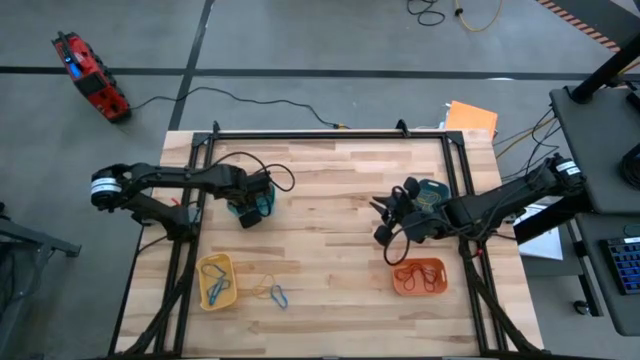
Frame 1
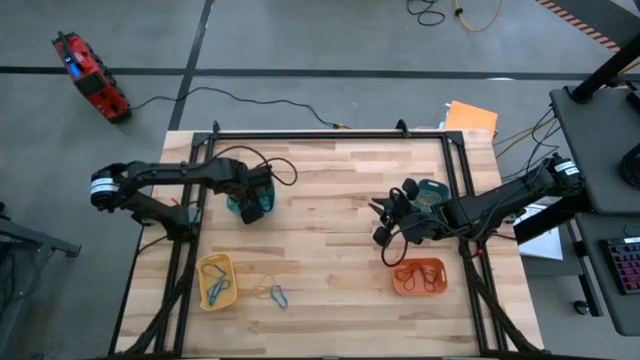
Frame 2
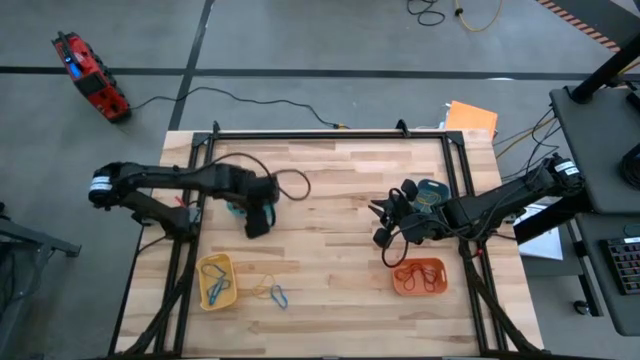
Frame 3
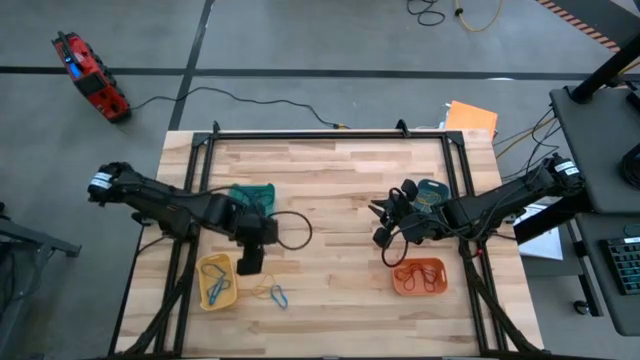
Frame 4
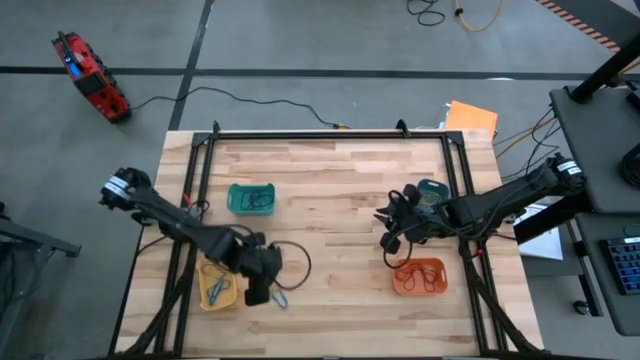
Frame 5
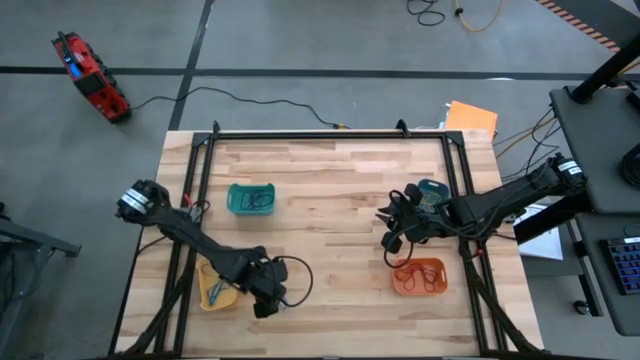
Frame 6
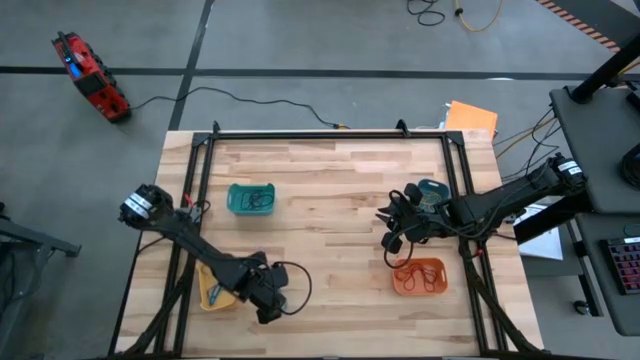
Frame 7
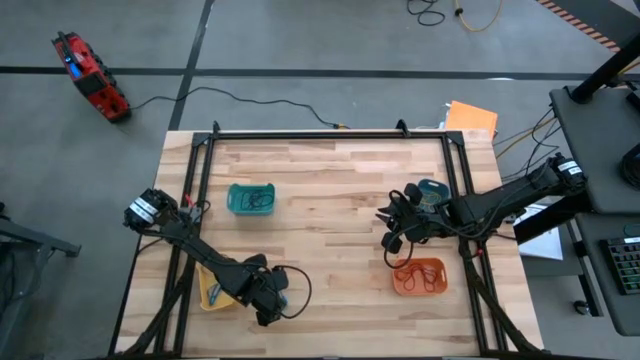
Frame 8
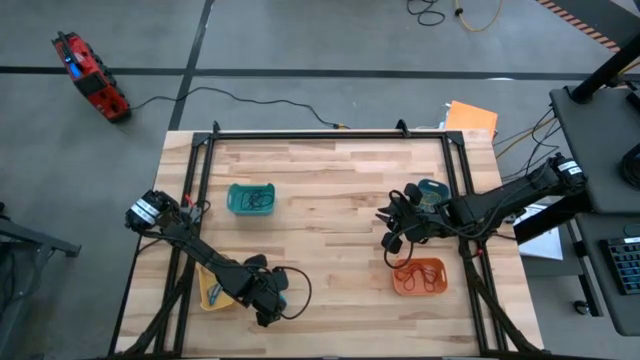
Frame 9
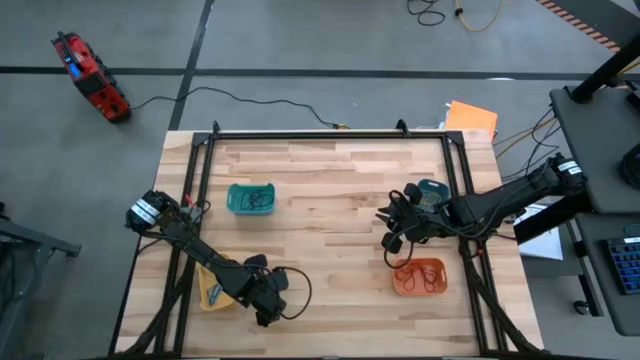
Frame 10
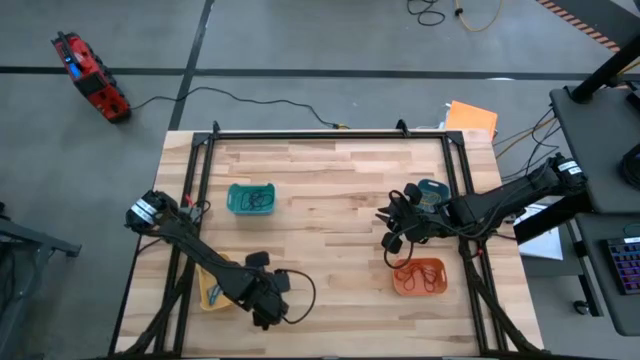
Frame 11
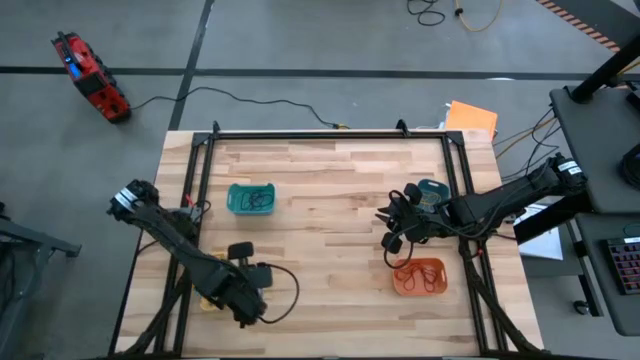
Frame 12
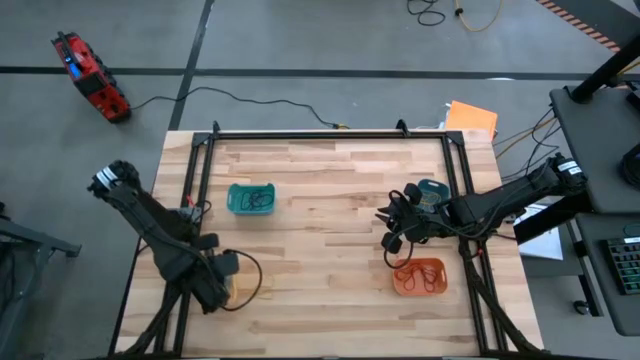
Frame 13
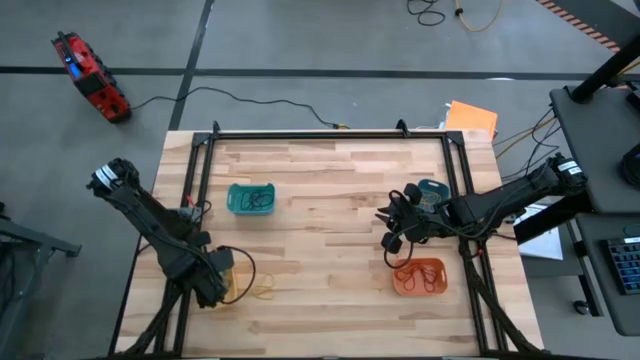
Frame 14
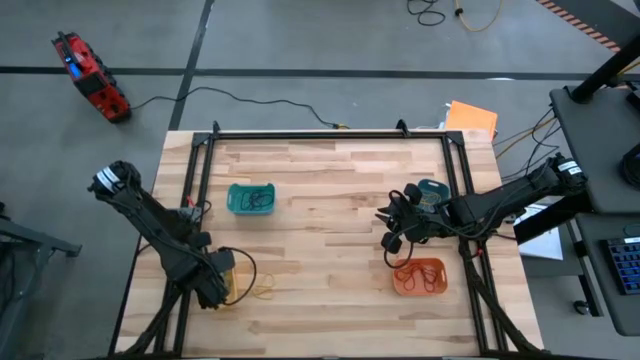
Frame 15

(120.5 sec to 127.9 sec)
Task: Sort rubber bands into baskets
Put the blue rubber band into the yellow bin

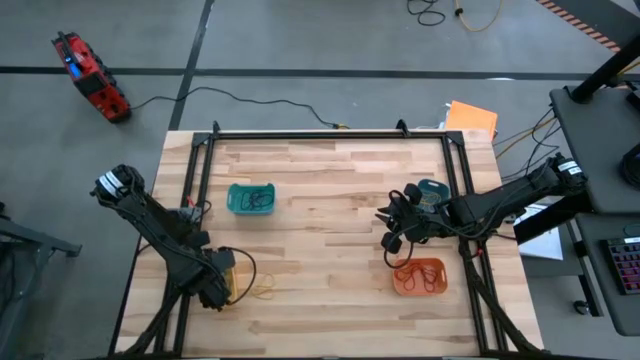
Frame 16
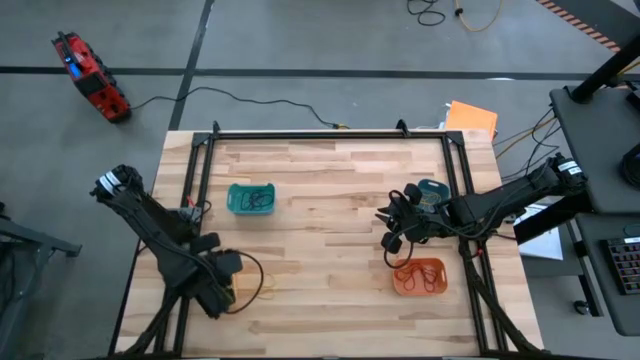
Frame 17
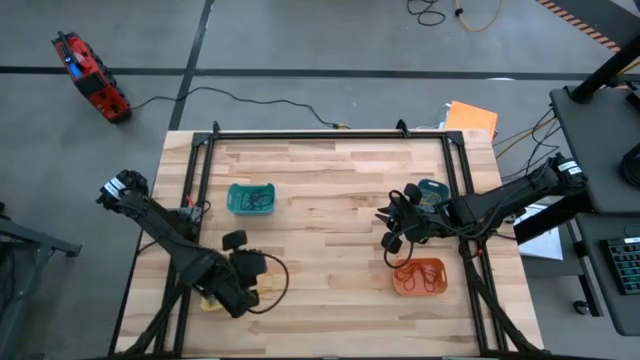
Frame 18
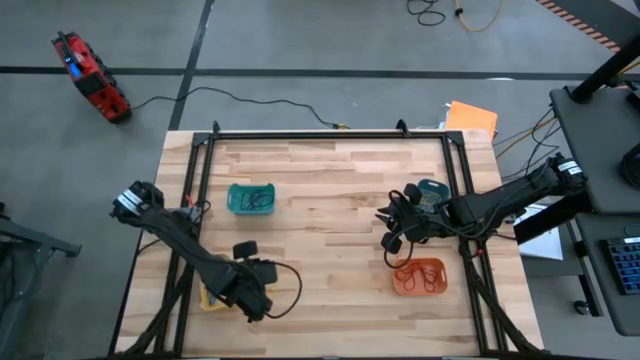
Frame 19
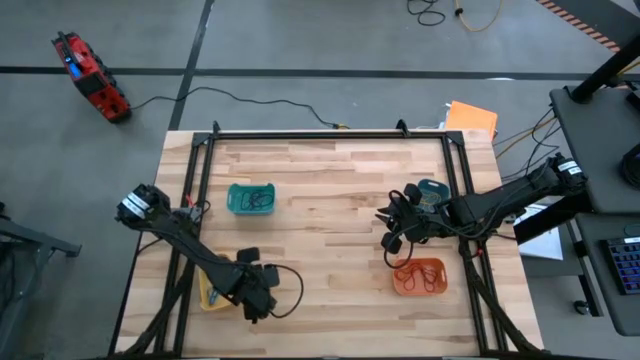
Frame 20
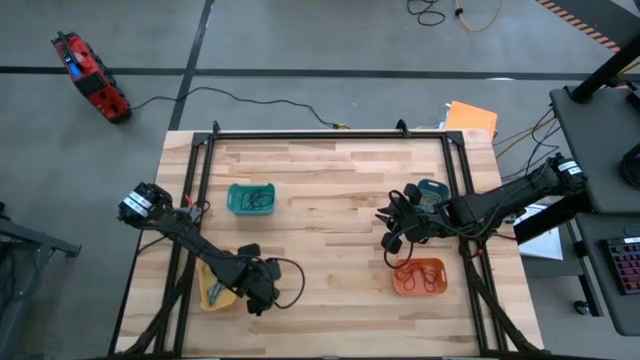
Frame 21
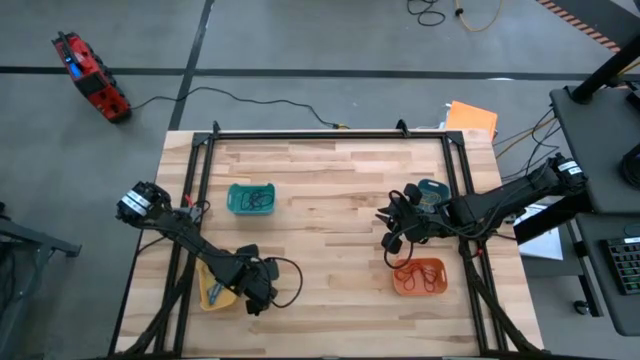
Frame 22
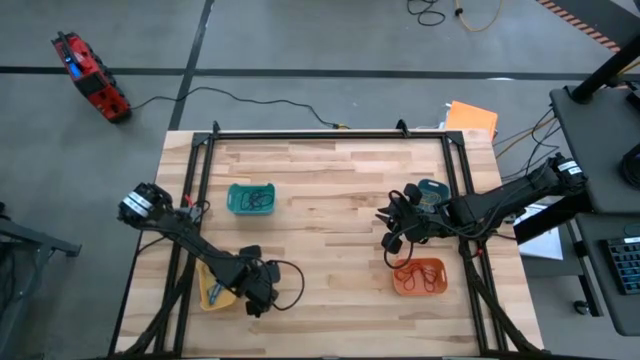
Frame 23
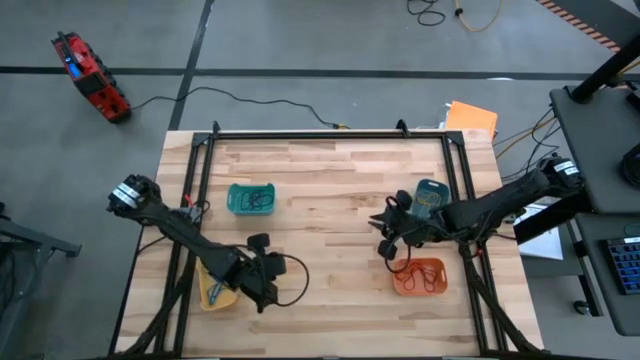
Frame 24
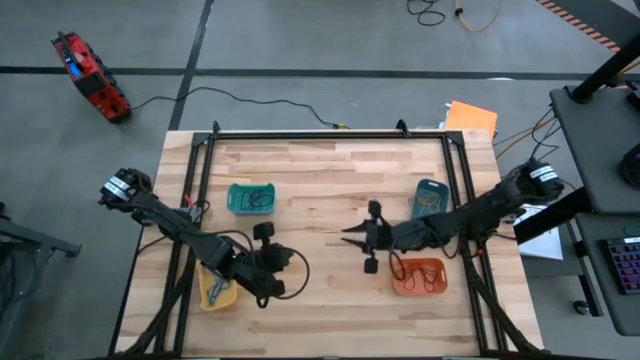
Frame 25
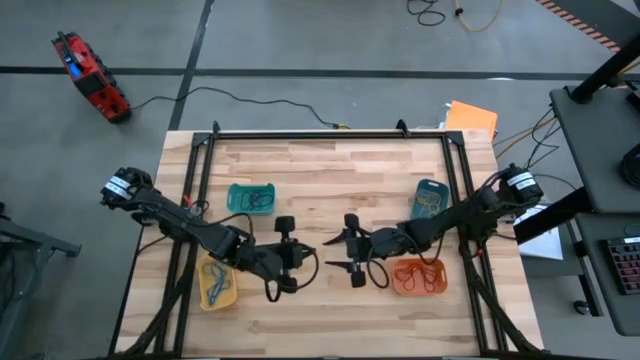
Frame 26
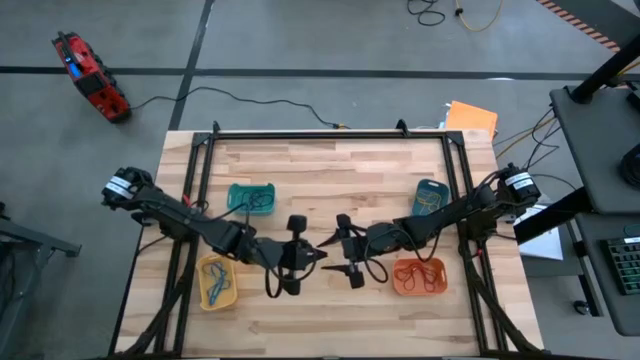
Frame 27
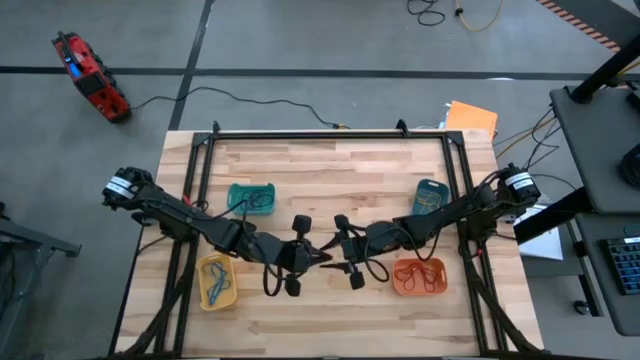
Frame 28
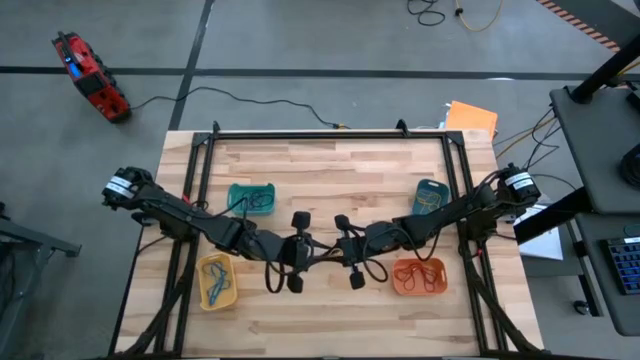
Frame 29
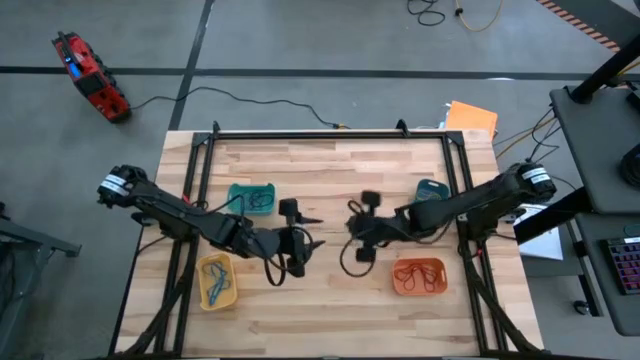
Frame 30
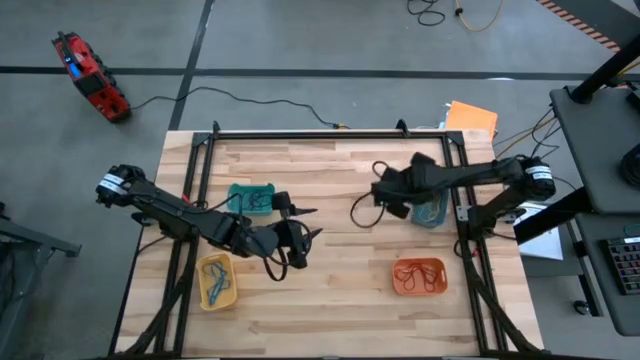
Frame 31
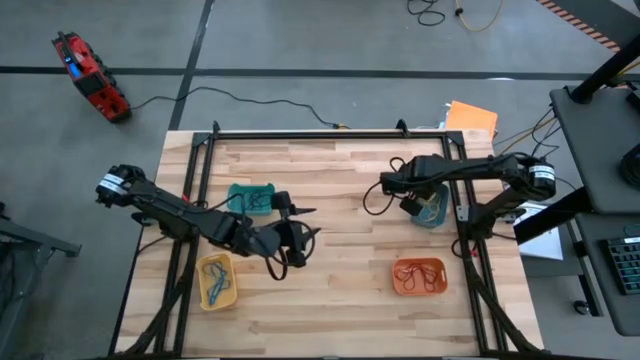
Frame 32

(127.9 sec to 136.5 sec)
Put the yellow rubber band into the blue bin

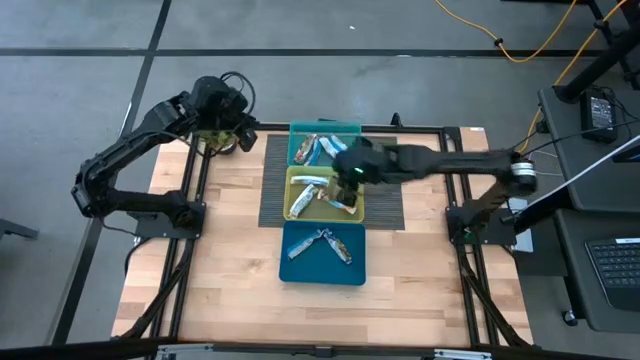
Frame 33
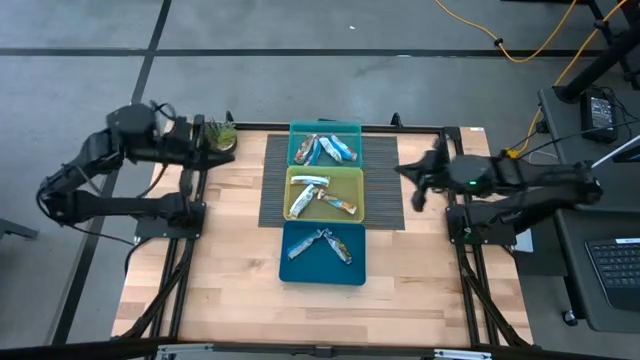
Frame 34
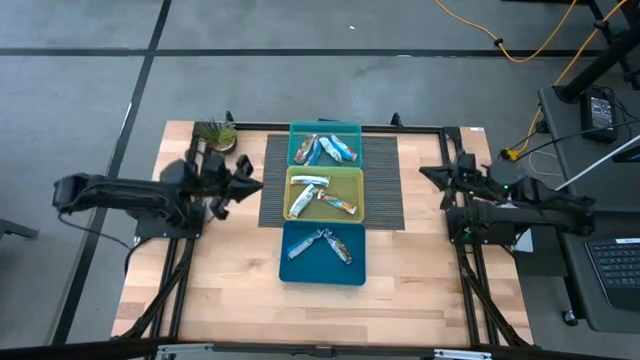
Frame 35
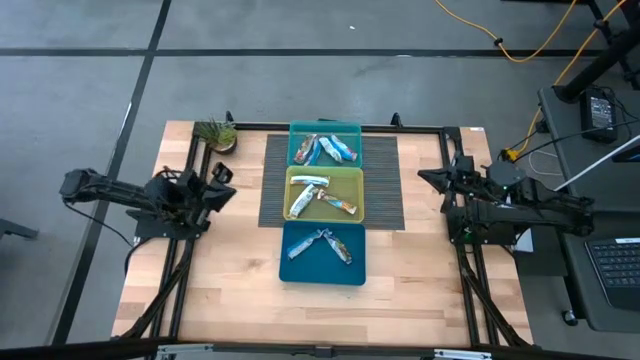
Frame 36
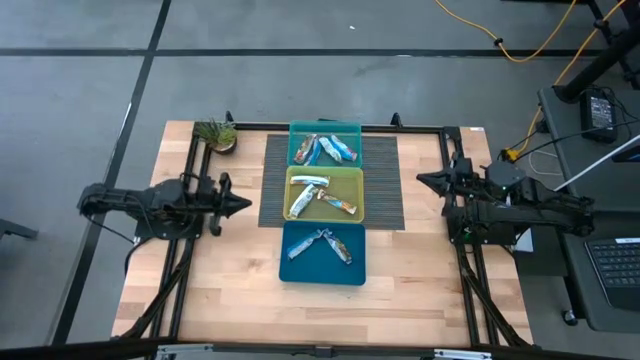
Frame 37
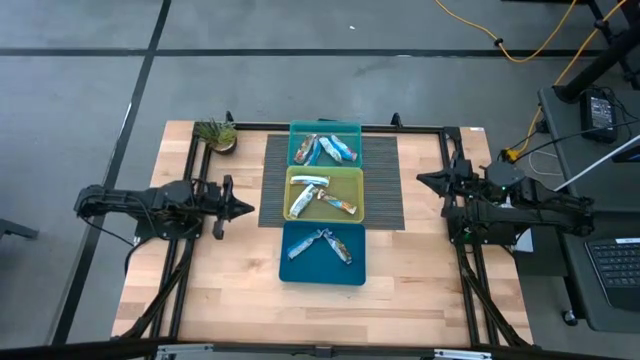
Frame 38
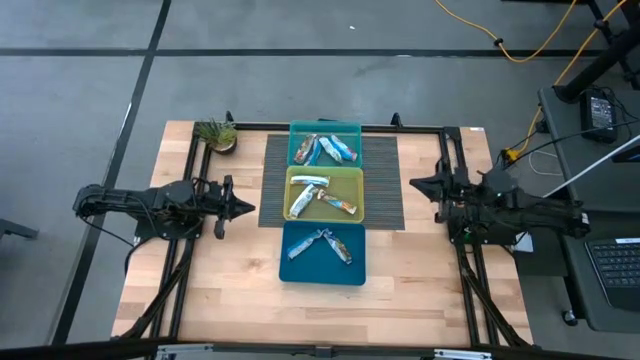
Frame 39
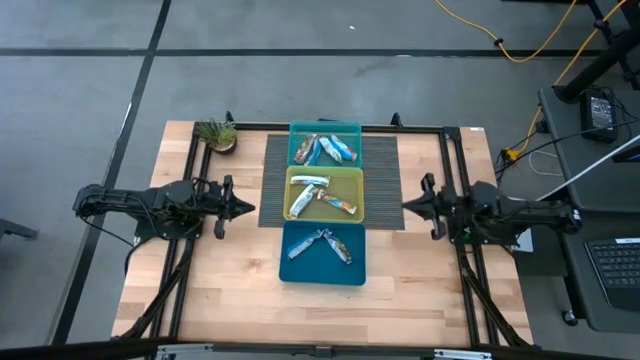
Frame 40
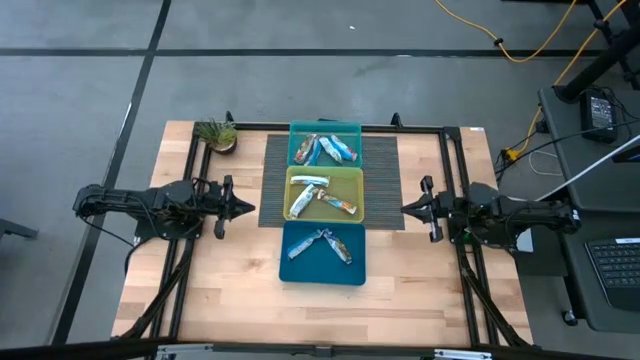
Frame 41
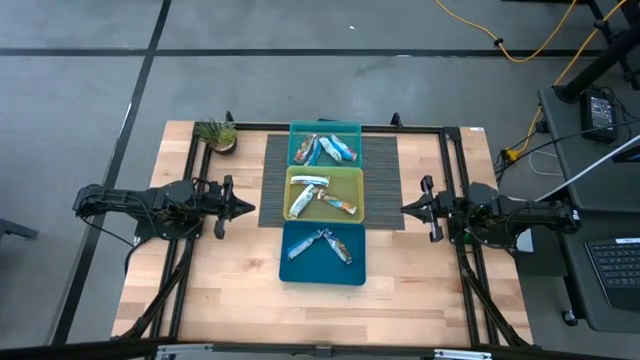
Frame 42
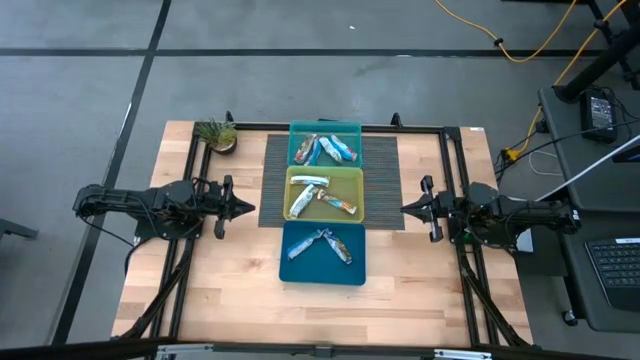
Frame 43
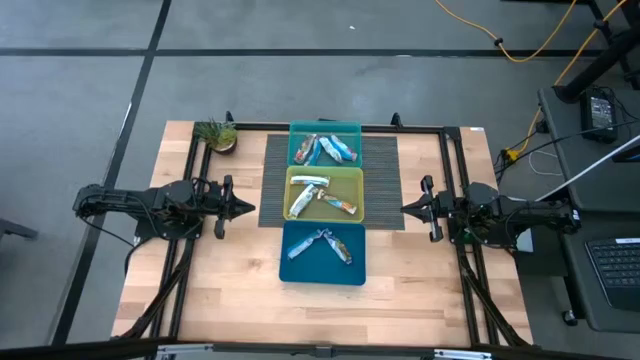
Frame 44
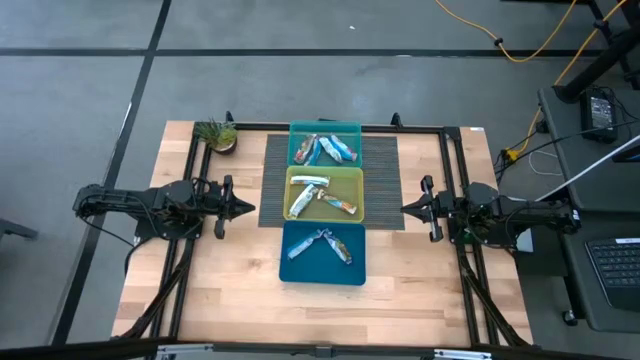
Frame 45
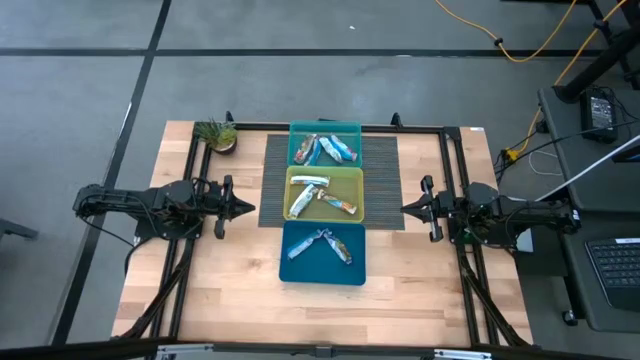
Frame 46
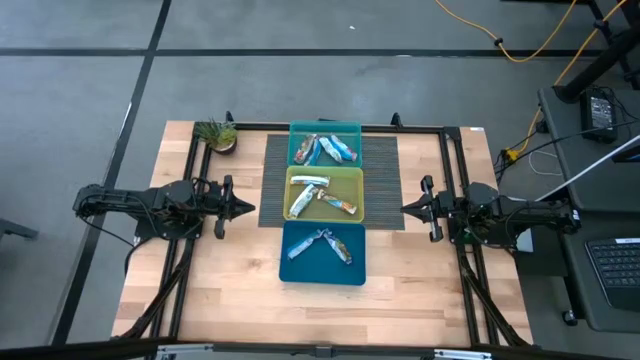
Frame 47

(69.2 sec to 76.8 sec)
Task: Pick and place Granola Bars by type
Return to Home Position
